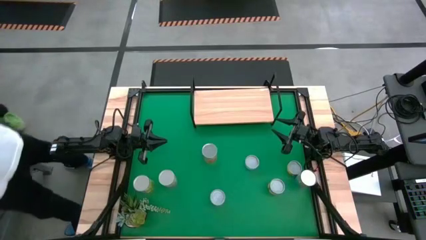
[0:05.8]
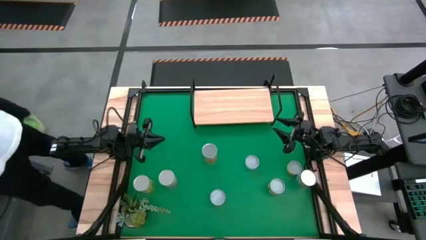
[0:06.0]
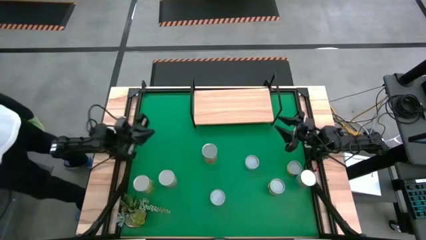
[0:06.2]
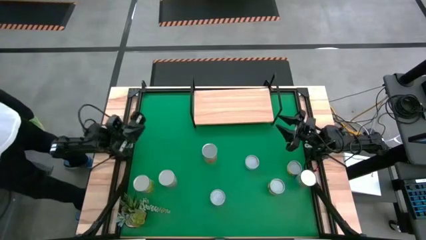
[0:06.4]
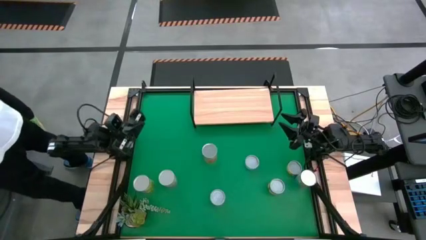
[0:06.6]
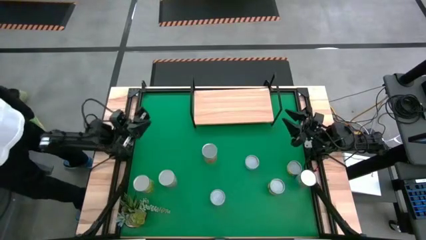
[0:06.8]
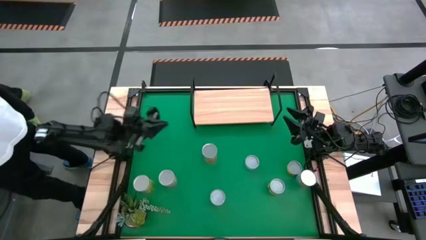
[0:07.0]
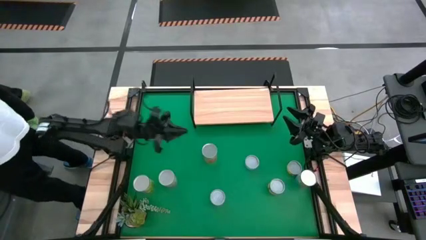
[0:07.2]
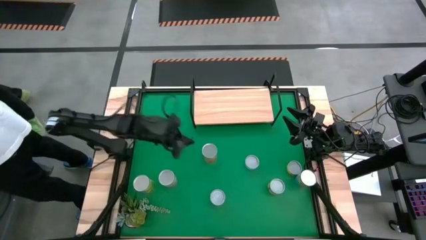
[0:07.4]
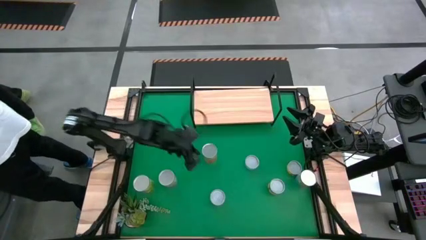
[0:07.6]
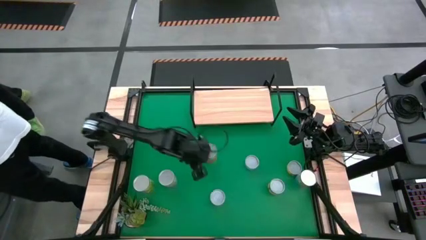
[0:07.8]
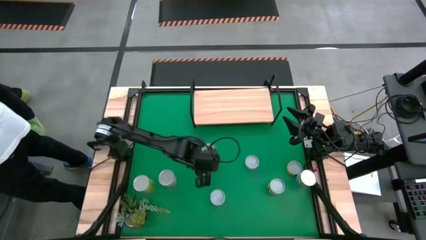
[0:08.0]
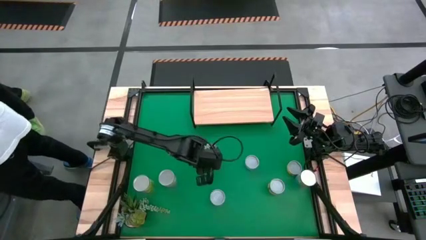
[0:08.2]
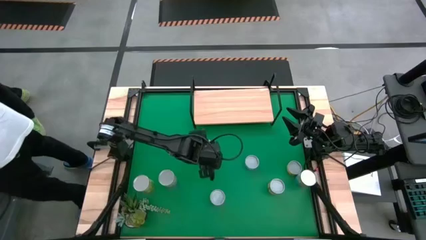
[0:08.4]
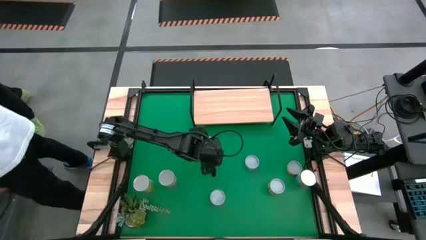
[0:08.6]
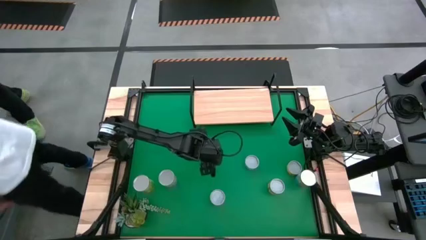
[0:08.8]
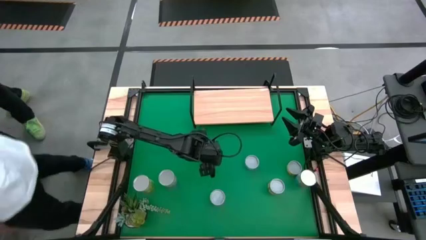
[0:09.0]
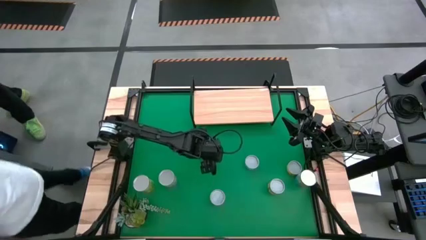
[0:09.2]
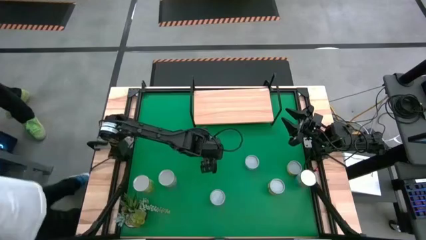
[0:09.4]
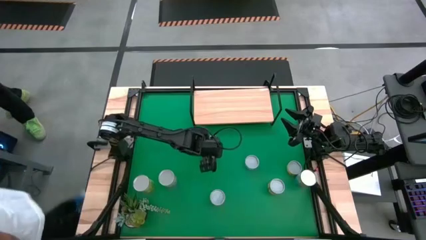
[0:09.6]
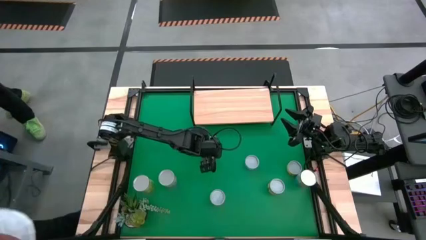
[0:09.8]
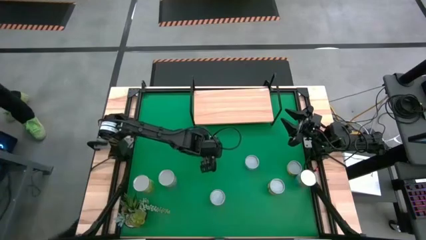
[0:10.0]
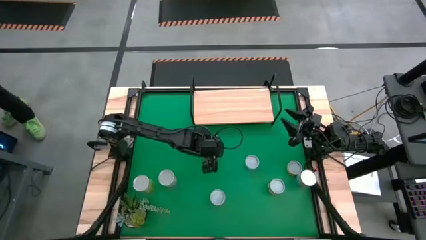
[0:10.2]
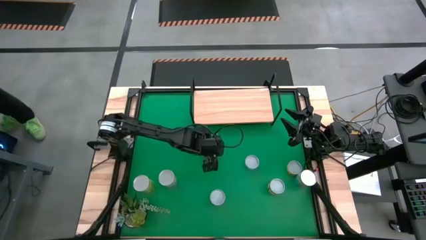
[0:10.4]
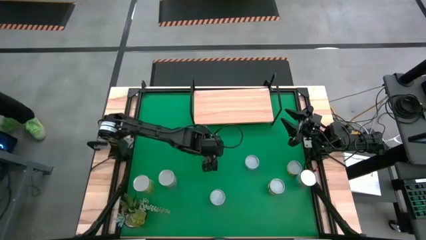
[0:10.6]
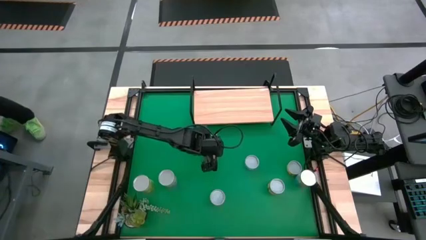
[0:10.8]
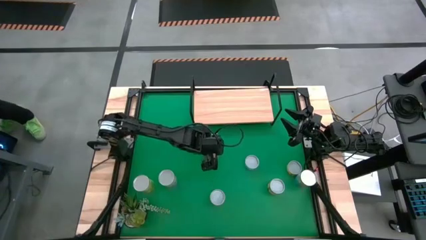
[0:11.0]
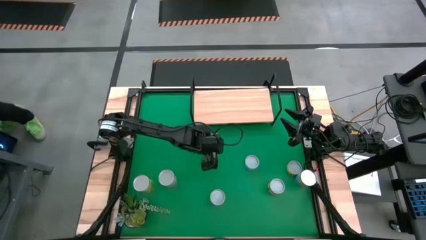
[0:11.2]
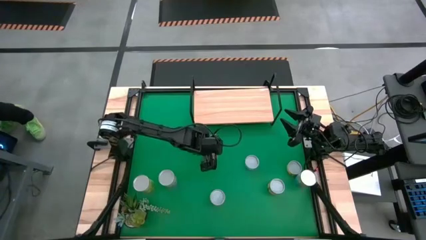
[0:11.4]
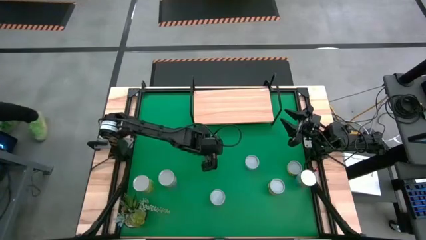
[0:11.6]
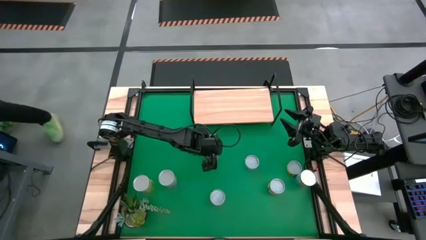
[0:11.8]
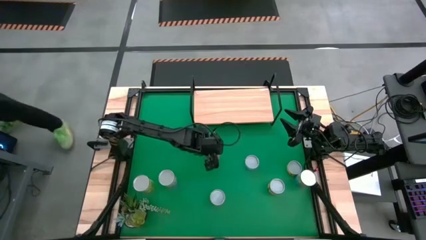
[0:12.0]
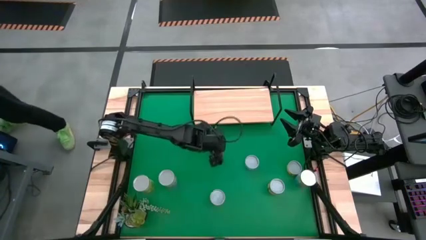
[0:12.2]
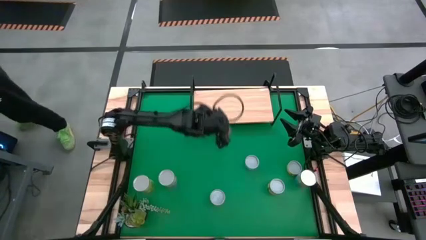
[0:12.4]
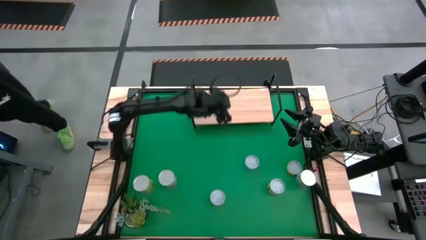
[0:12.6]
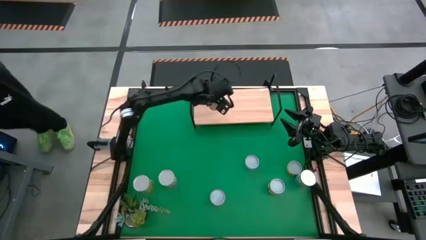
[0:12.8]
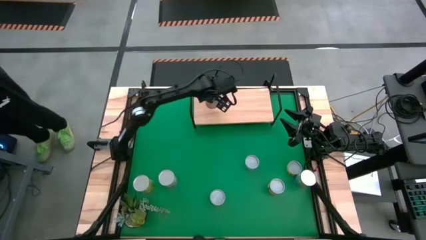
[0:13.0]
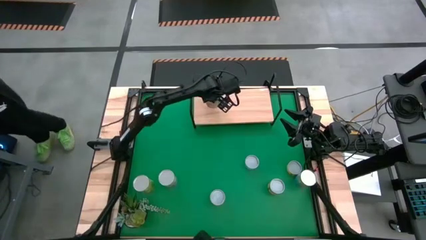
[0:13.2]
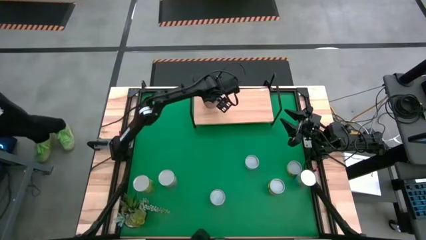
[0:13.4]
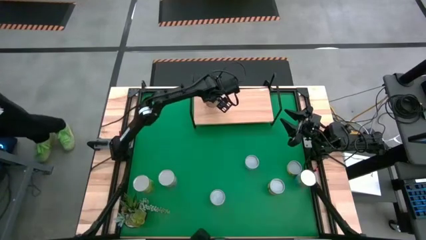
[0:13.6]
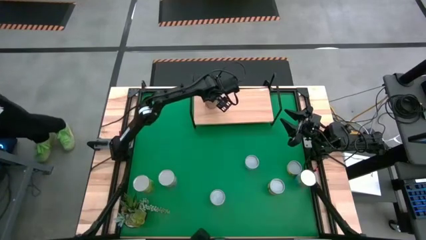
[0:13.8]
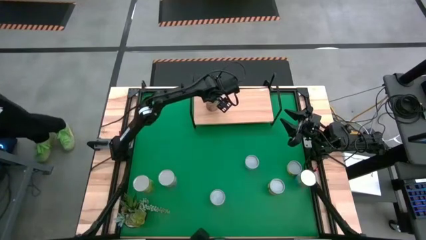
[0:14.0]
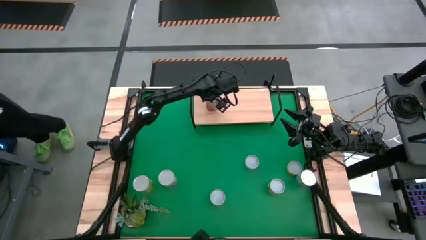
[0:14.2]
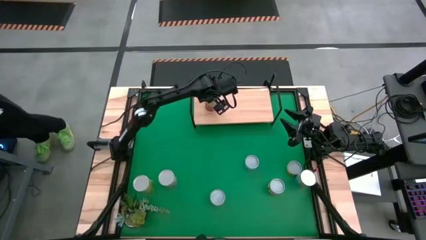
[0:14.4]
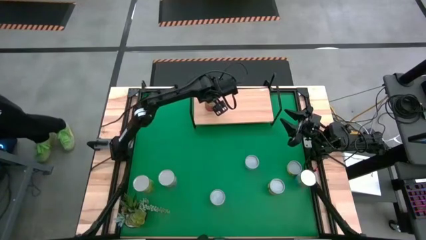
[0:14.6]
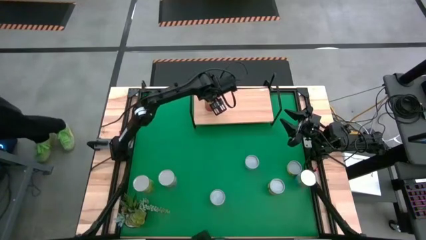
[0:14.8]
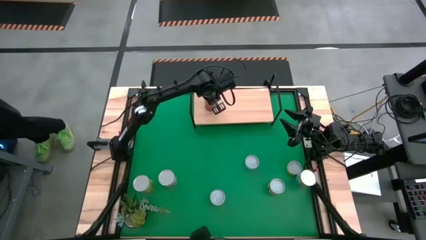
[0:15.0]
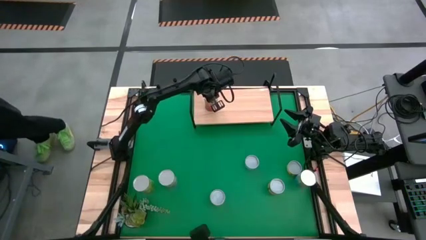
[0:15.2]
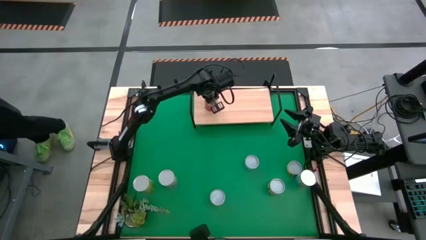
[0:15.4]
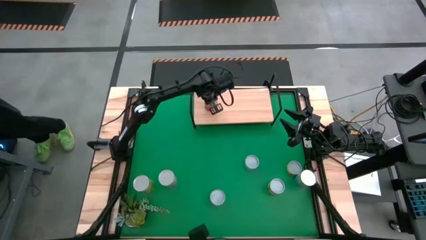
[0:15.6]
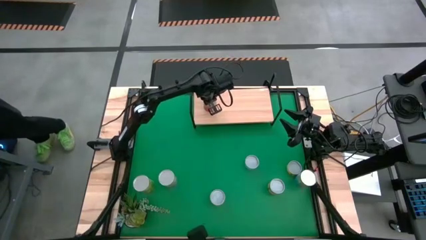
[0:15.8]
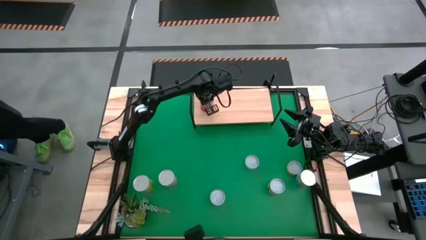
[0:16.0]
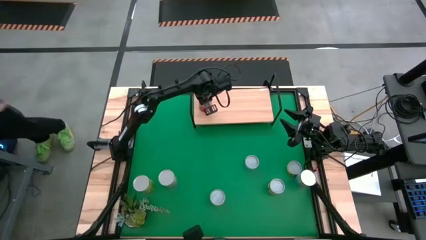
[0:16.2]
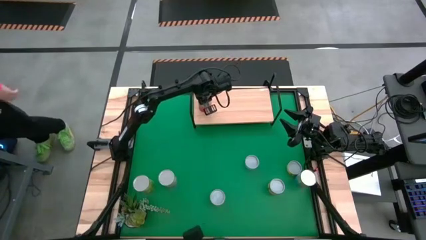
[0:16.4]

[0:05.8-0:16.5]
Task: Pick and place cans onto a shelf
Put the canned pineapple on the shelf

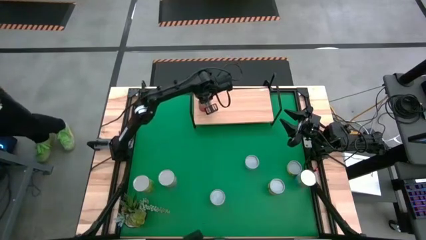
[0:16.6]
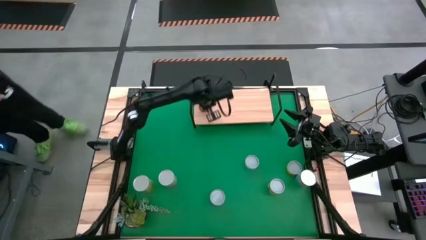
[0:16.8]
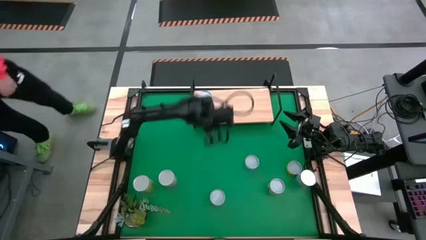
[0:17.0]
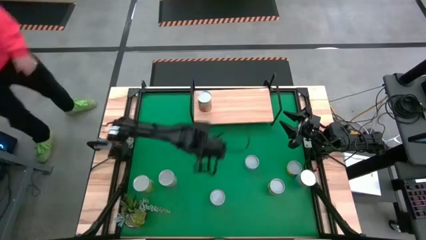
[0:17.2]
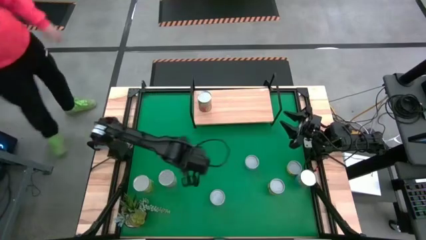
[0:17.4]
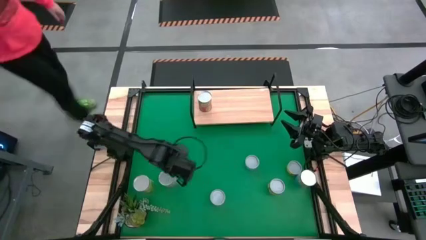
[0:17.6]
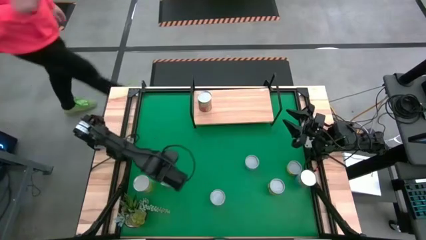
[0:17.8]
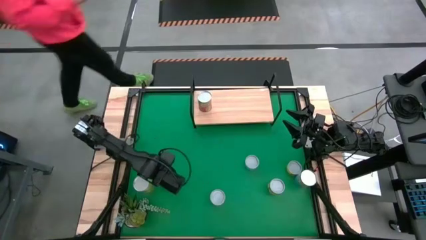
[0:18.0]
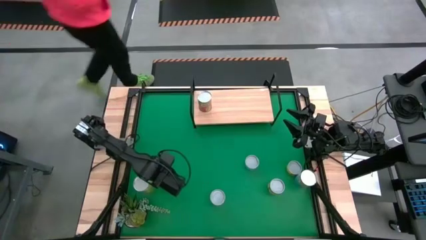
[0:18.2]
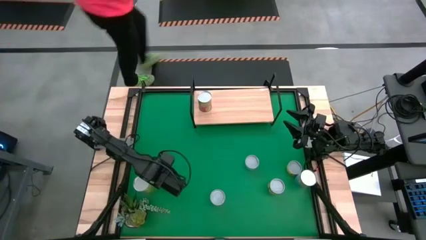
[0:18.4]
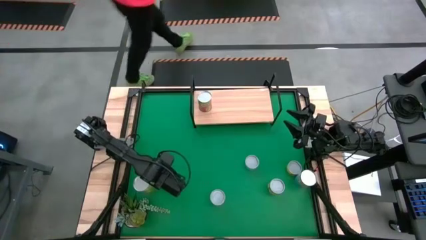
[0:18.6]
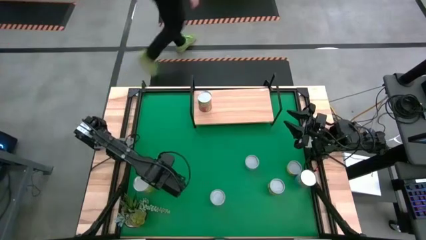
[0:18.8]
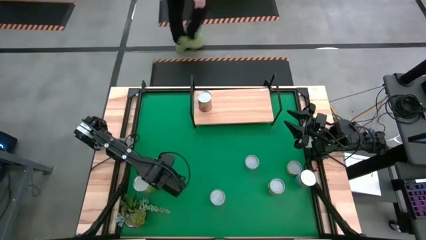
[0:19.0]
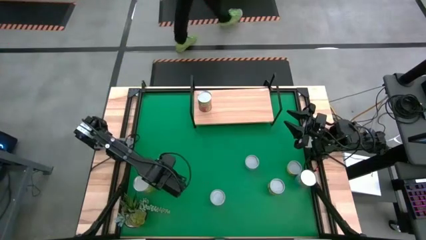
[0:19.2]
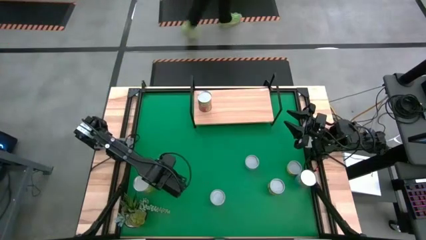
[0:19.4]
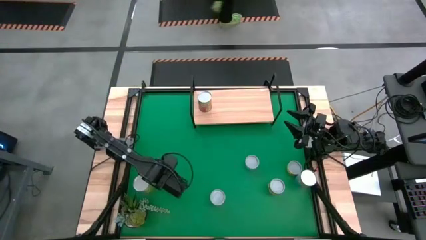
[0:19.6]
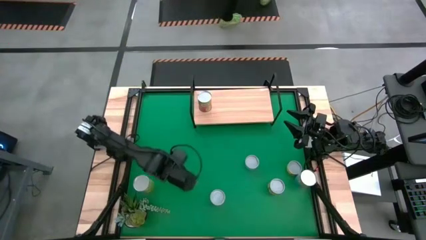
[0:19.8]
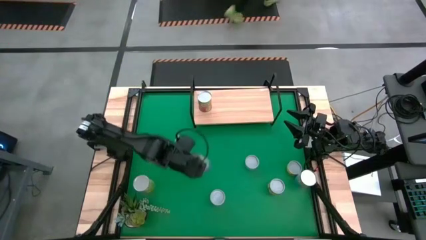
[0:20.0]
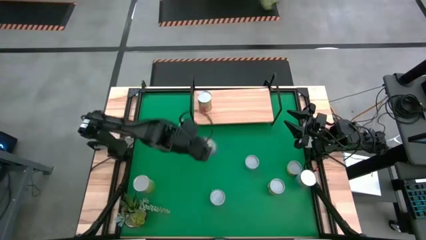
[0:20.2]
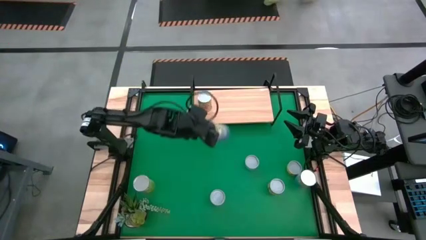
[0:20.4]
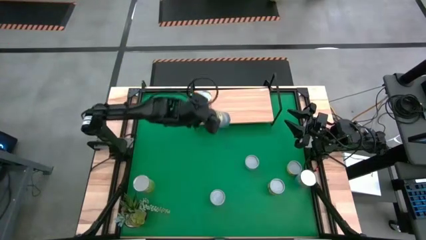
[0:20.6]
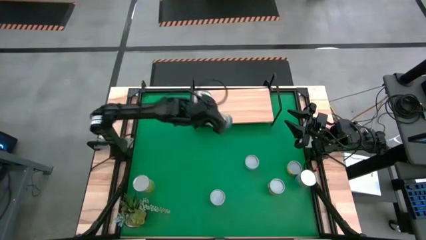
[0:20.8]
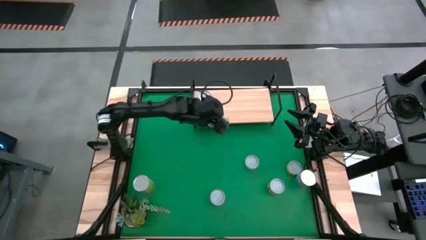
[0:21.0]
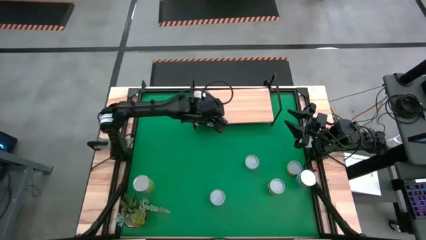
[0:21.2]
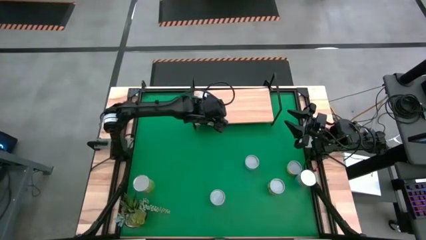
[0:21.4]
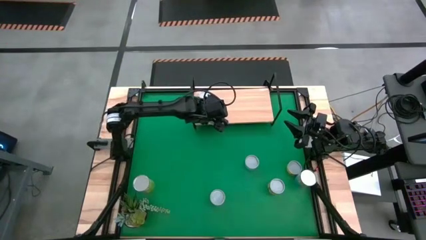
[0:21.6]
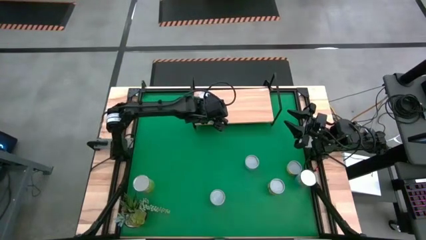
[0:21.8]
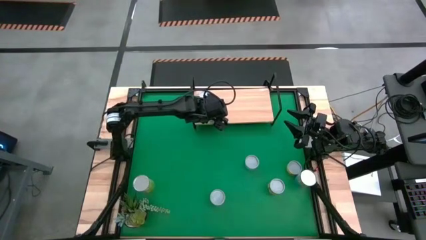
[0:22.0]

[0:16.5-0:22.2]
Put the canned peas on the shelf

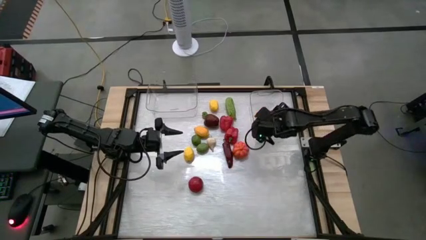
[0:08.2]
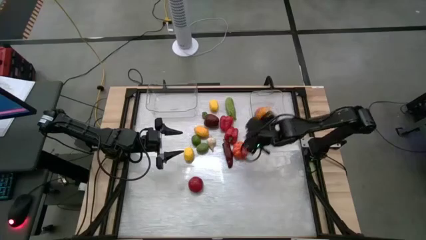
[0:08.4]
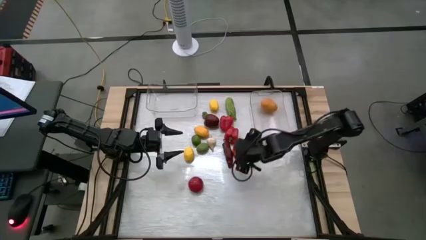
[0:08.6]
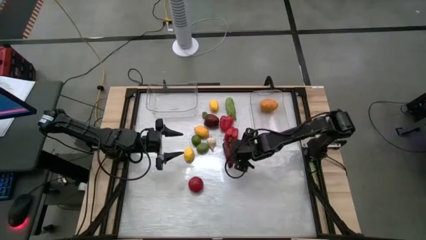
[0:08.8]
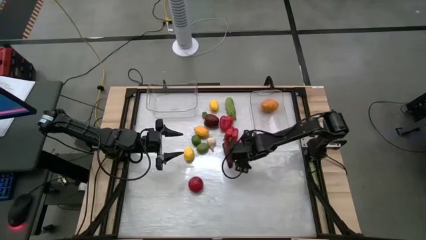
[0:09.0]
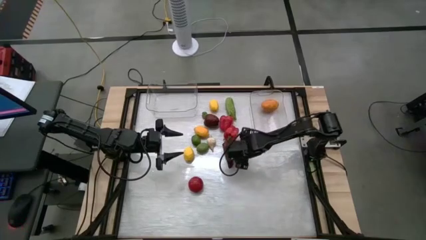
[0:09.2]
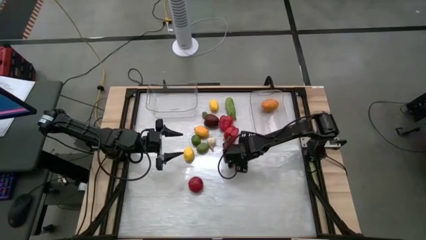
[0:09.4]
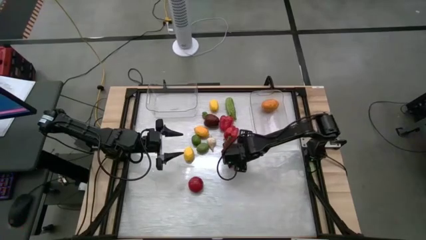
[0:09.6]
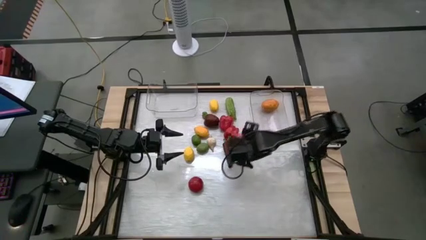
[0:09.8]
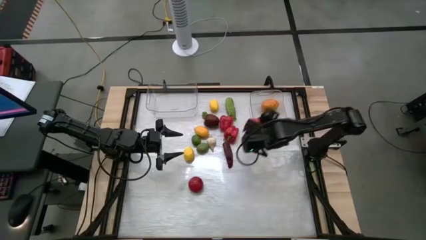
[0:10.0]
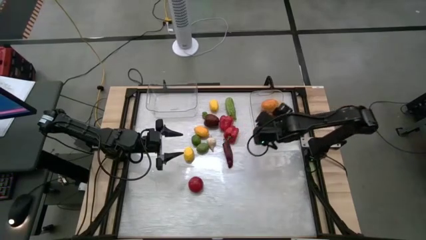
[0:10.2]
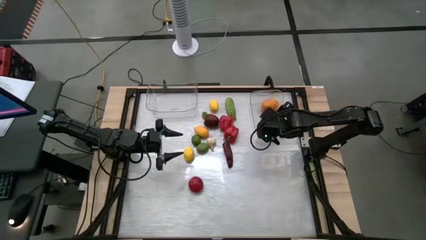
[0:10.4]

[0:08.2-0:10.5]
Task: Sort produce into baskets
Put the orange pumpkin into the right transparent bin
